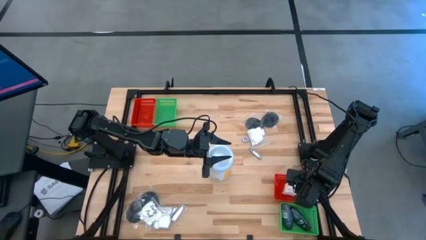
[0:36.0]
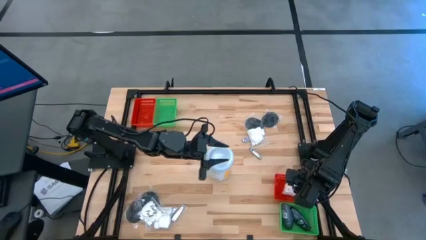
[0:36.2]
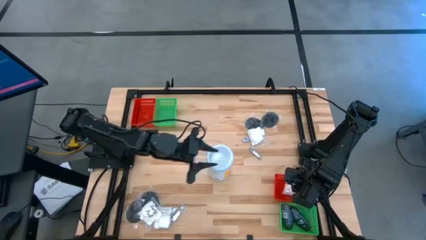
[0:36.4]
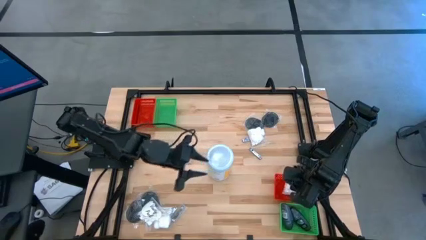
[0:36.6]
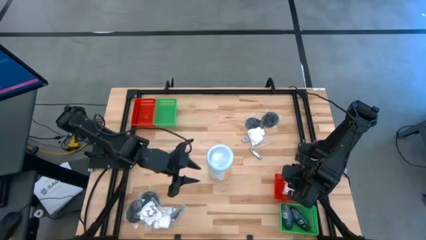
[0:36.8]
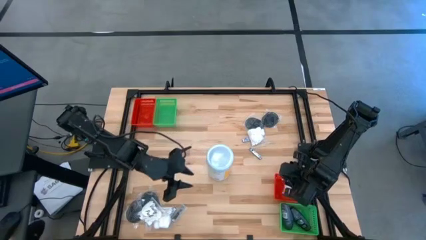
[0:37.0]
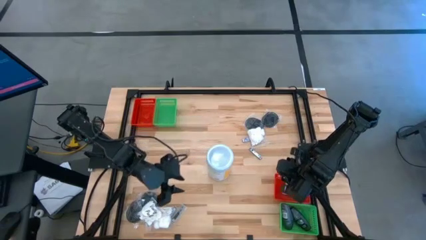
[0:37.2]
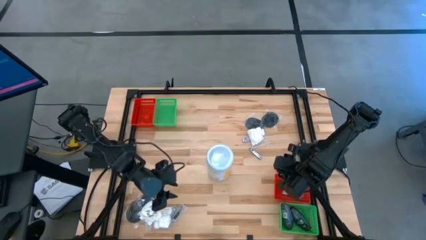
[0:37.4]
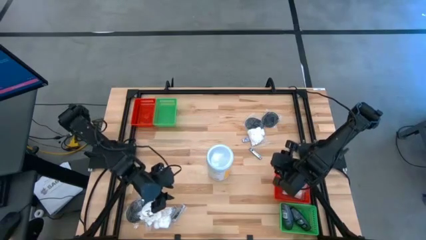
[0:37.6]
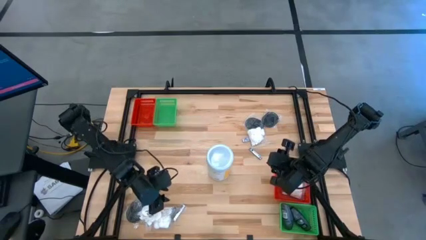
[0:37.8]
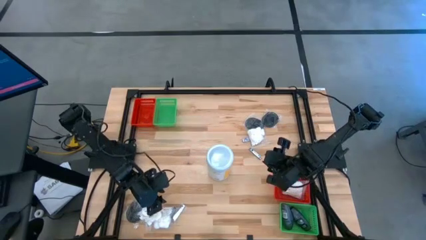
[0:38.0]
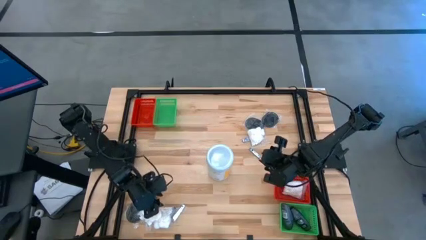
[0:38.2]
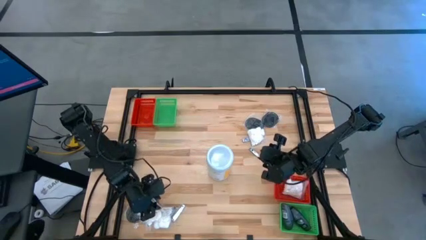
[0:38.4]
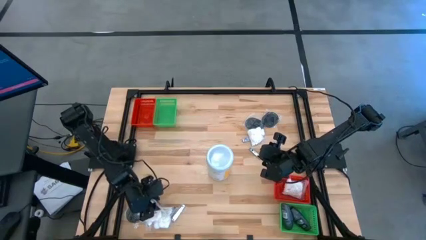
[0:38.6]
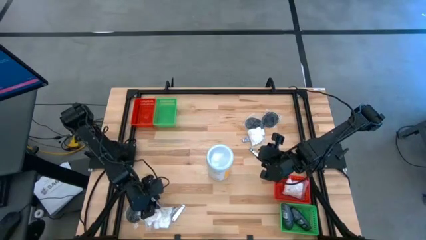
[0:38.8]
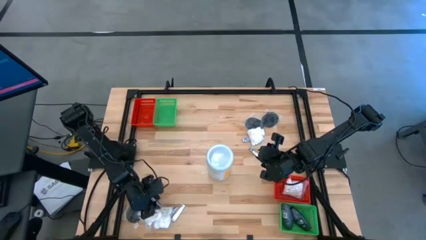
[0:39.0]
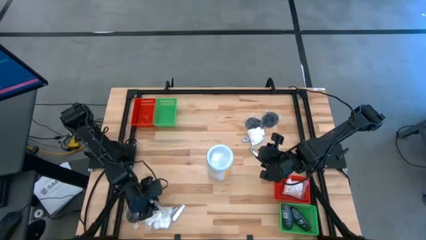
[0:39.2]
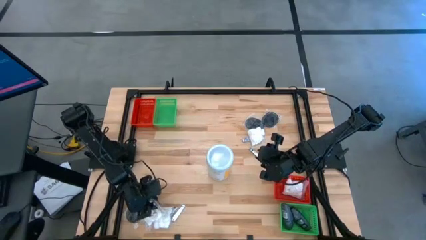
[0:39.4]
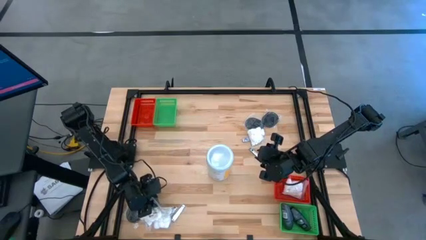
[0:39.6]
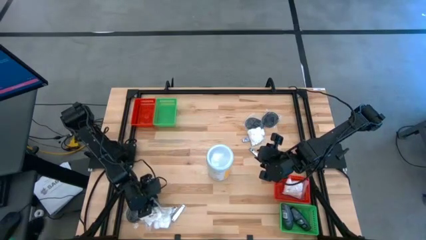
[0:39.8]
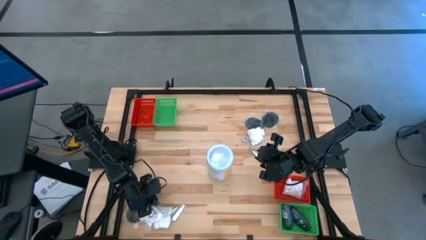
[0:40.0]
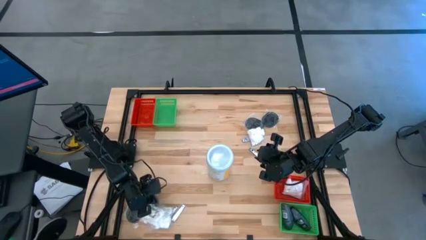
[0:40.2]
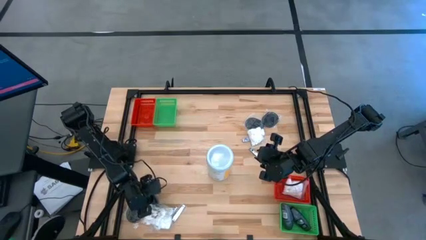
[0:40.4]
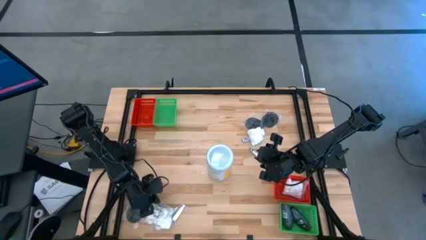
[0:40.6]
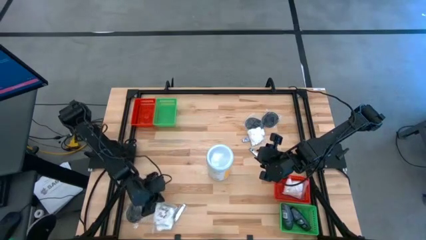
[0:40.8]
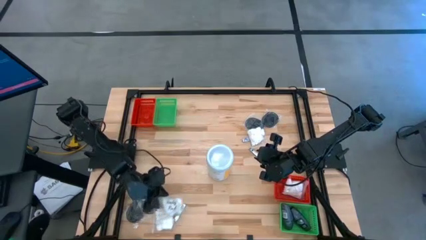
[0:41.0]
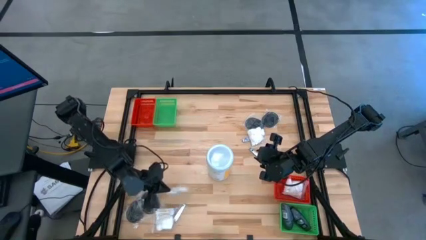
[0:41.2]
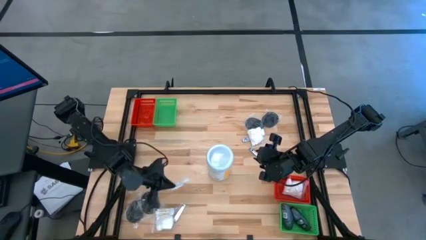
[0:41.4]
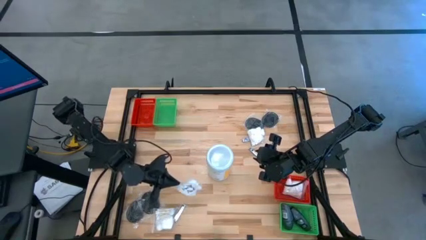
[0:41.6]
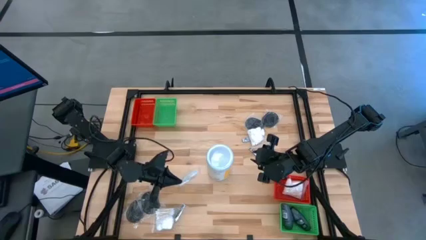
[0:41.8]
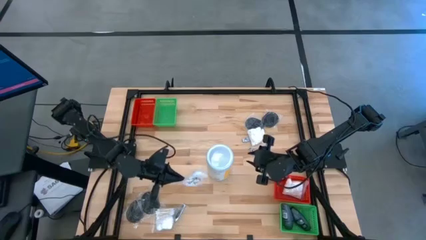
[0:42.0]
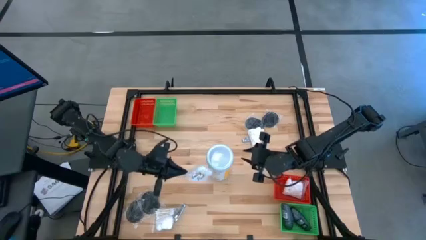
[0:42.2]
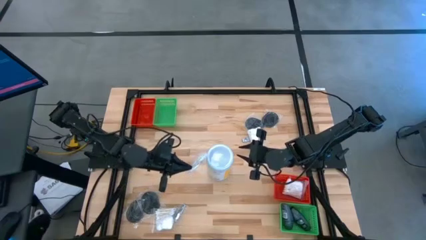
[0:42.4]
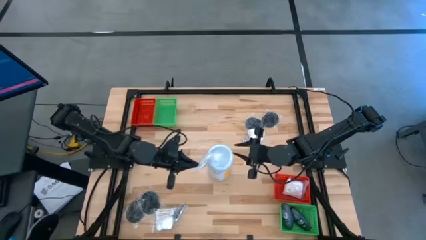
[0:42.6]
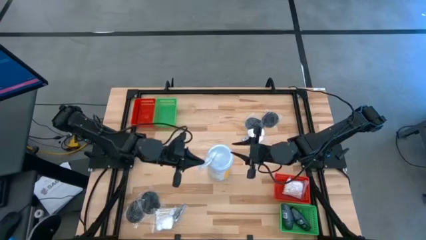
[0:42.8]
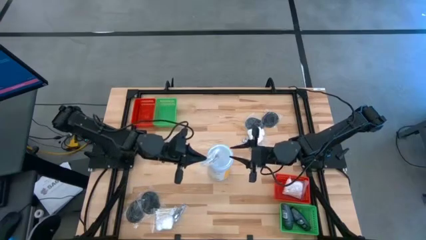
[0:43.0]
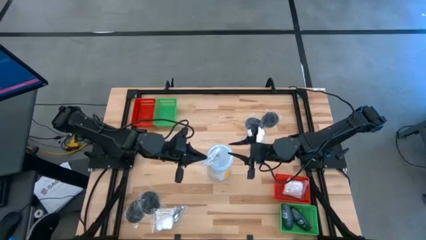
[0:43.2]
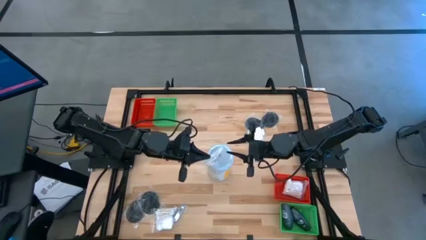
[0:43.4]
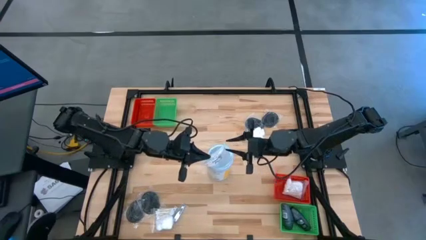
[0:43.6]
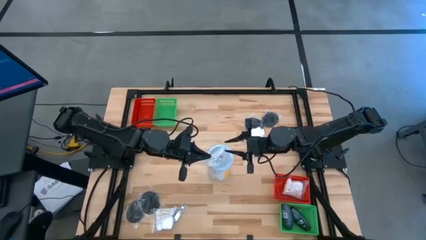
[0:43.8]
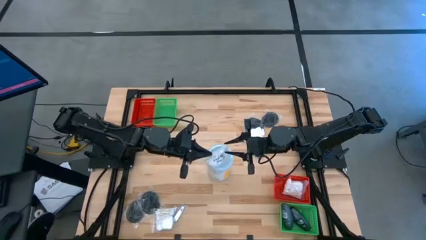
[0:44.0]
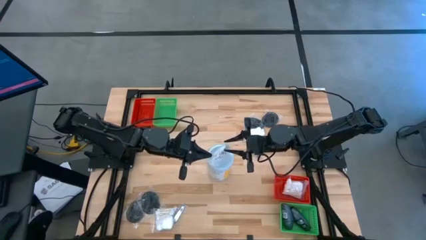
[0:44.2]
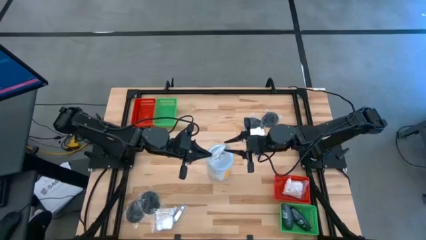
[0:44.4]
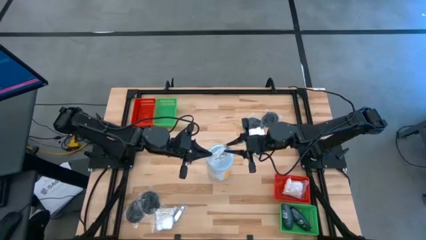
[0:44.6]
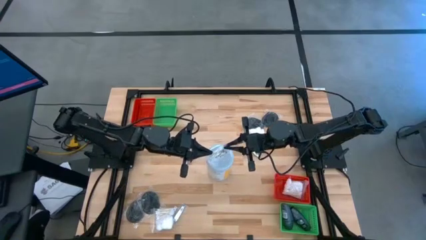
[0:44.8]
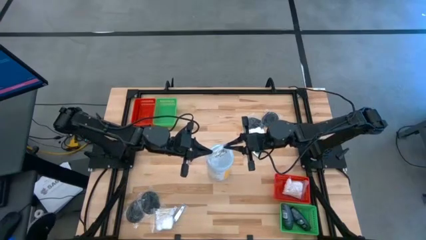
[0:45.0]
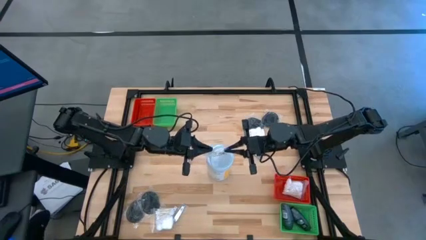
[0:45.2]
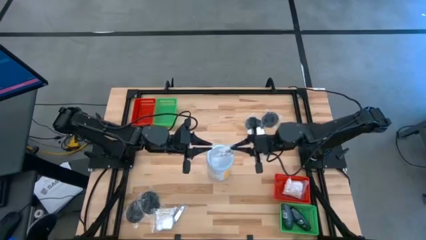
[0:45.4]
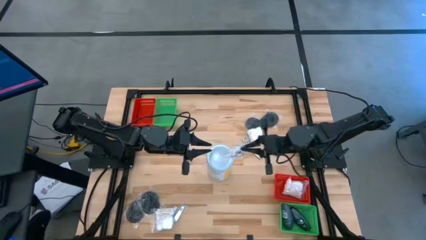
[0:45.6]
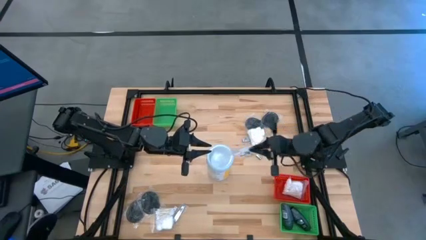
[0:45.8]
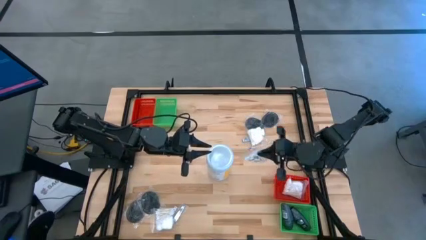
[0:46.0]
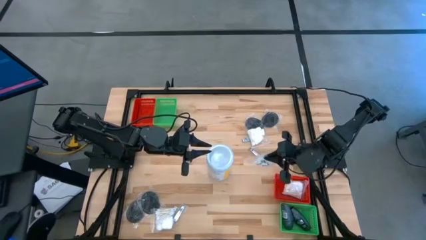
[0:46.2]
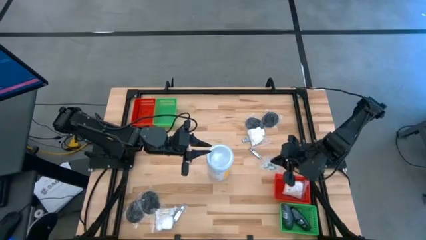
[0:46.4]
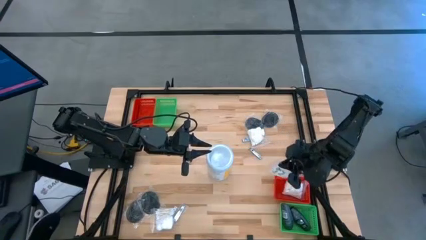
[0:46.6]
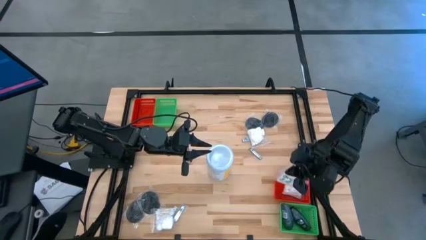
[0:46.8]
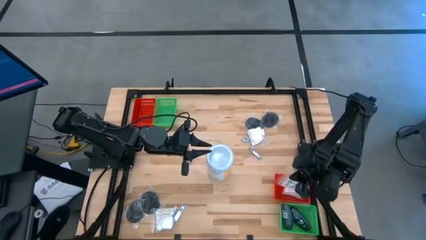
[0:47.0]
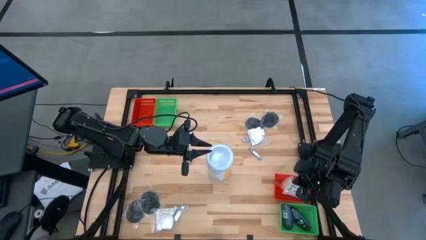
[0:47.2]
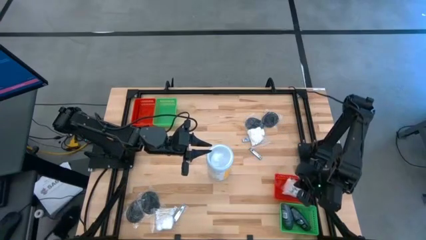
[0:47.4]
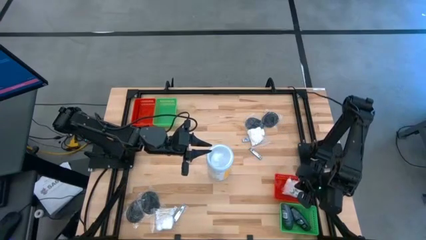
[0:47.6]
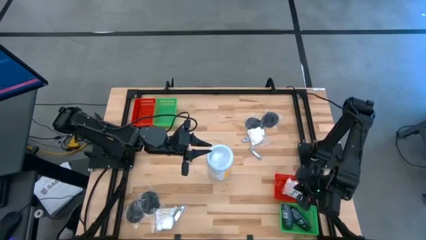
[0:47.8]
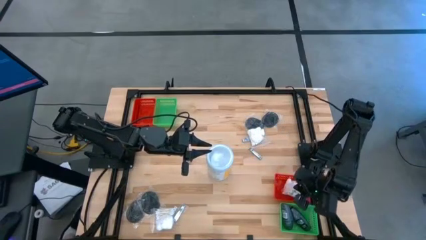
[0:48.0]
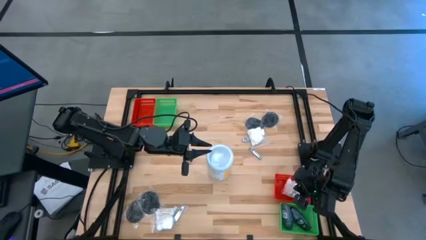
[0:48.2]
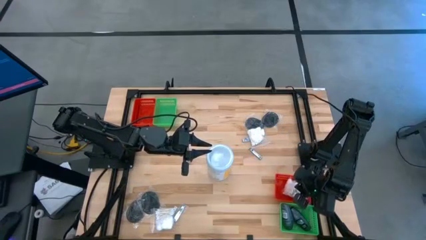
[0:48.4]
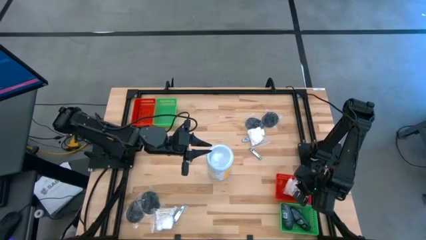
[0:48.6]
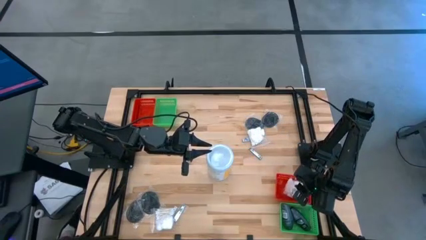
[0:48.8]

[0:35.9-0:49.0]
Task: Pick & Place Travel size toiletries
Put the white cotton pack into the bottom red basket
